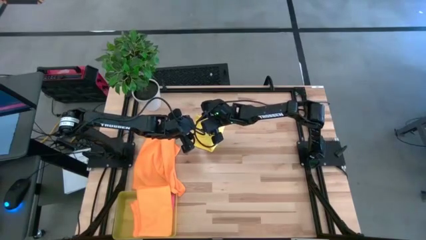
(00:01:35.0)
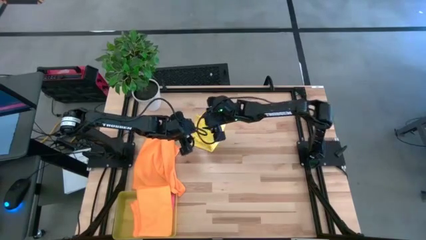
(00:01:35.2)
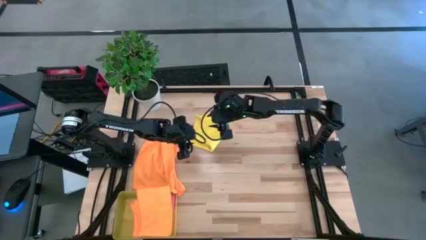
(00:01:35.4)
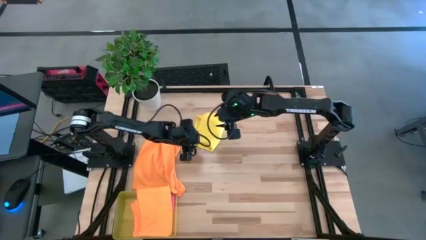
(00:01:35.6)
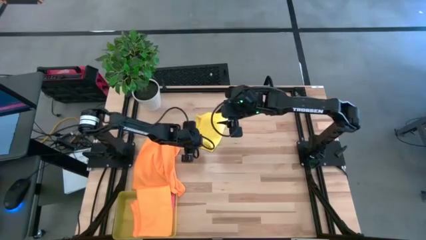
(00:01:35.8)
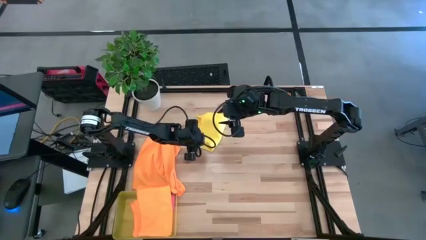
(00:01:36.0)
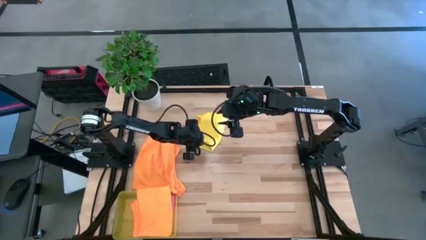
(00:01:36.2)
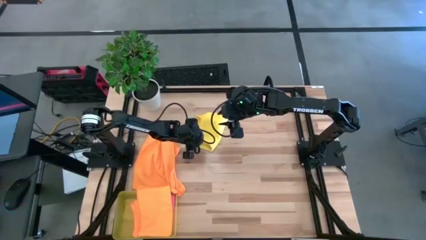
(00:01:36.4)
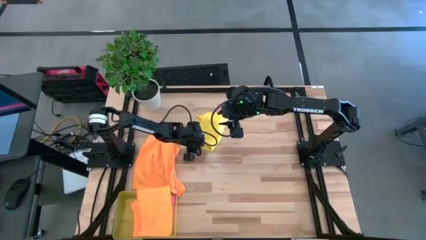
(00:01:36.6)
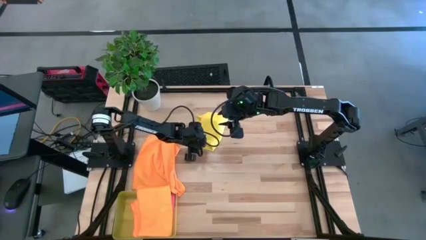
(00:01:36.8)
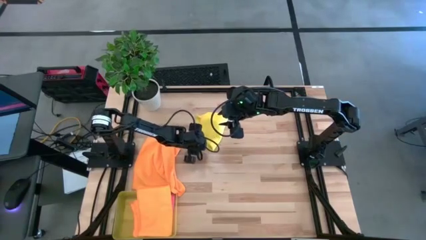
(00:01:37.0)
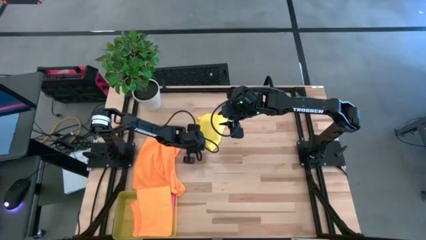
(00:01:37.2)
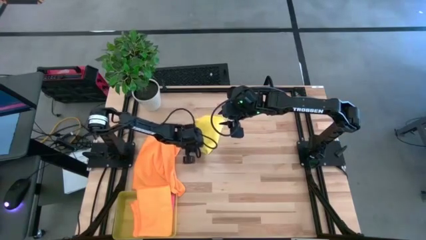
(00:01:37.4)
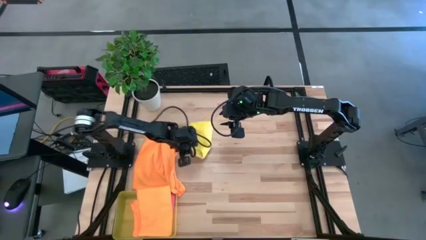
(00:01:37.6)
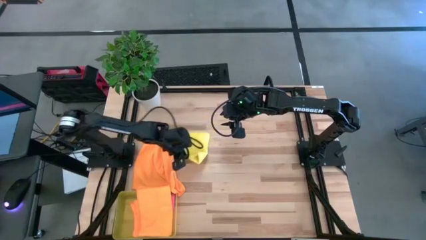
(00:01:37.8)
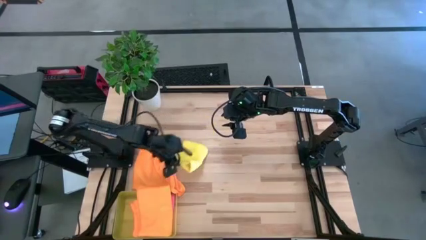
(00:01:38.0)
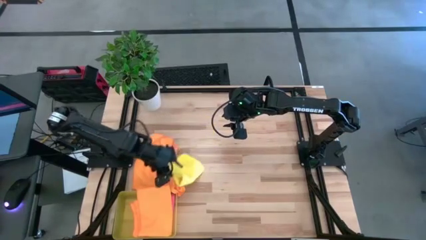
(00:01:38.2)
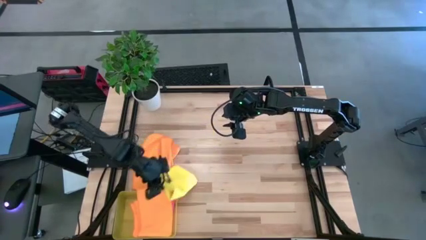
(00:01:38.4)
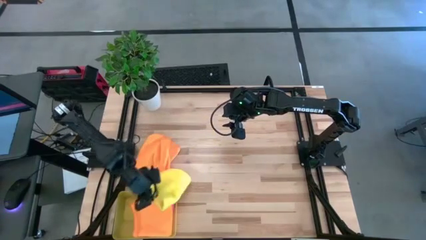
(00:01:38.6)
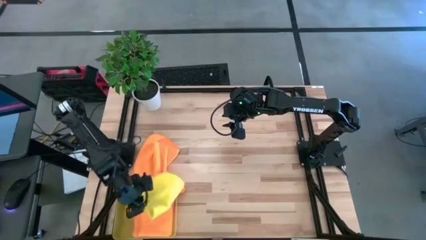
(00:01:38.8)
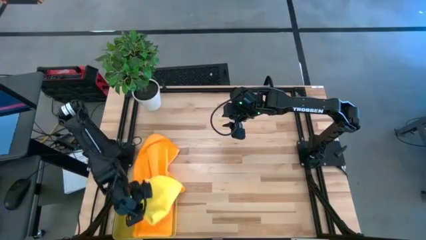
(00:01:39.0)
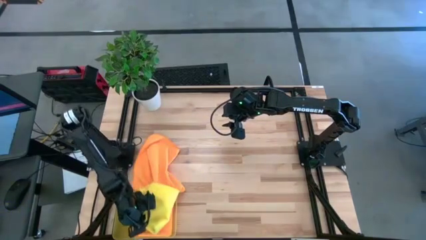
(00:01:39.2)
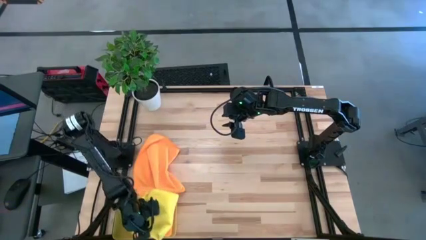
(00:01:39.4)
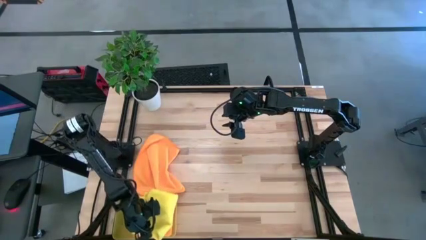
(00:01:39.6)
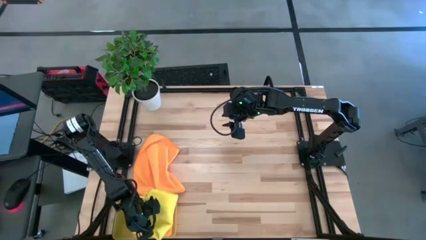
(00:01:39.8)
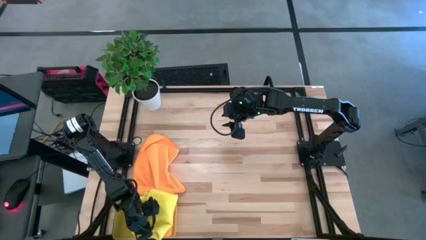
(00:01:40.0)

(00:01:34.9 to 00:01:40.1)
Task: Fold microfiber towels
Put the folded yellow microfiber towel into the yellow bin

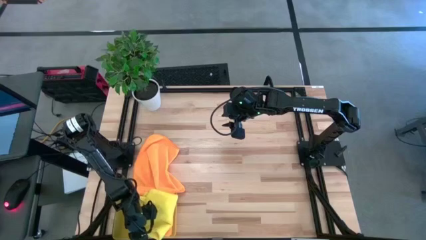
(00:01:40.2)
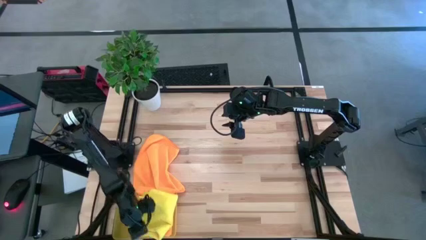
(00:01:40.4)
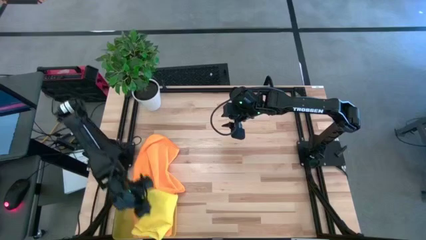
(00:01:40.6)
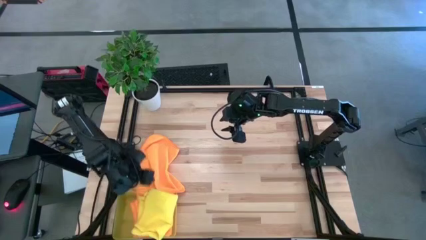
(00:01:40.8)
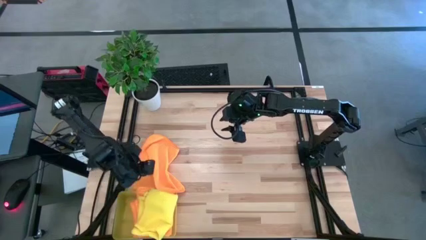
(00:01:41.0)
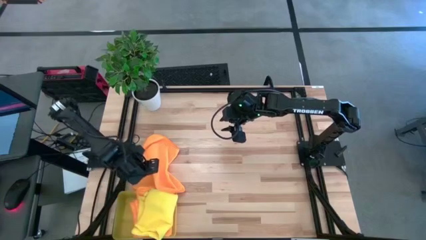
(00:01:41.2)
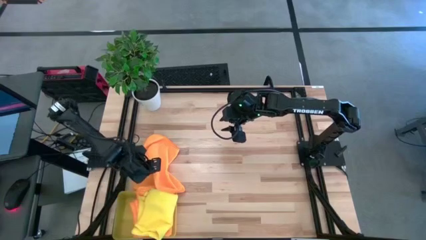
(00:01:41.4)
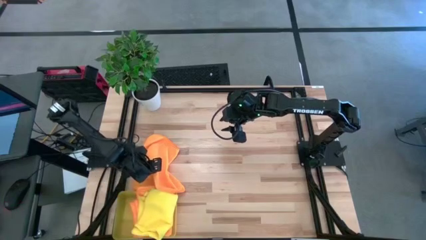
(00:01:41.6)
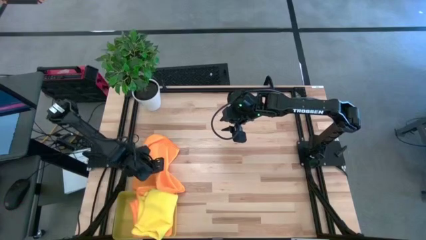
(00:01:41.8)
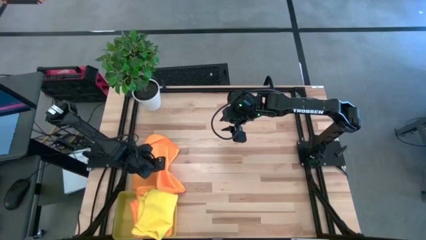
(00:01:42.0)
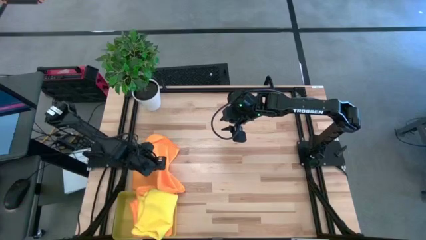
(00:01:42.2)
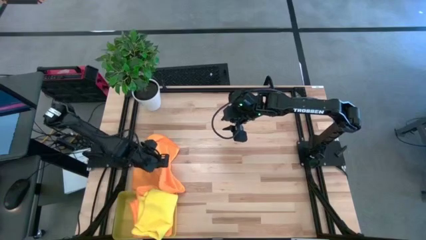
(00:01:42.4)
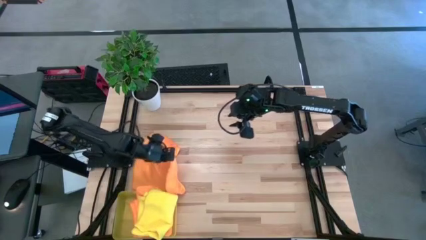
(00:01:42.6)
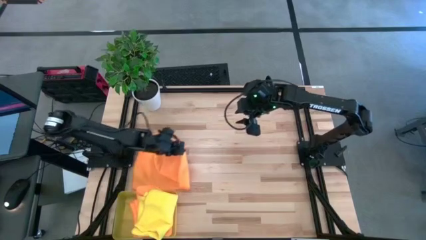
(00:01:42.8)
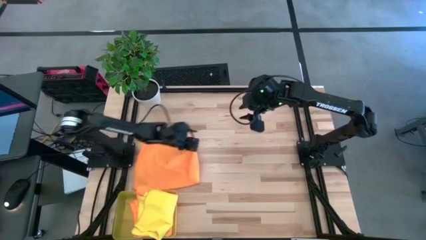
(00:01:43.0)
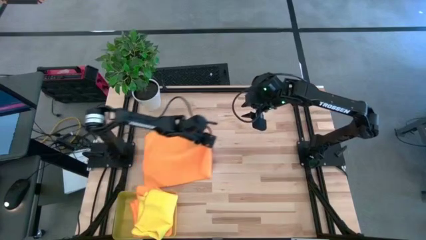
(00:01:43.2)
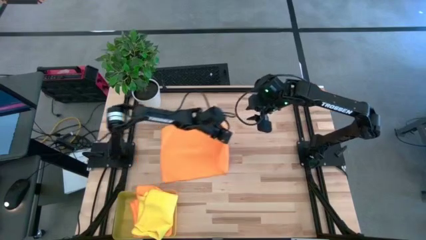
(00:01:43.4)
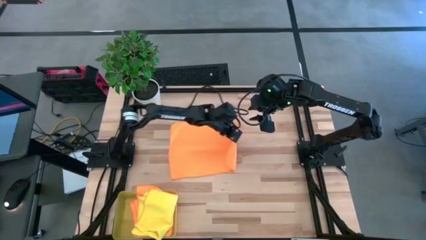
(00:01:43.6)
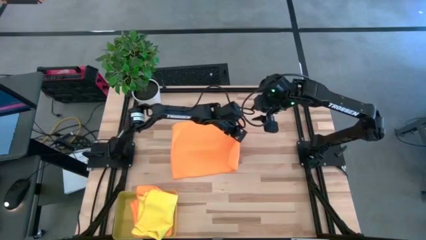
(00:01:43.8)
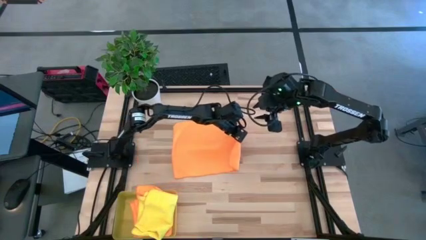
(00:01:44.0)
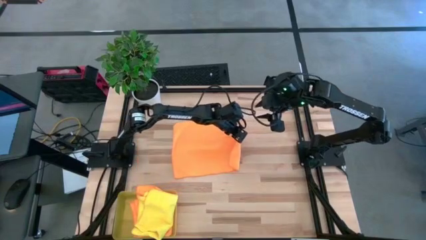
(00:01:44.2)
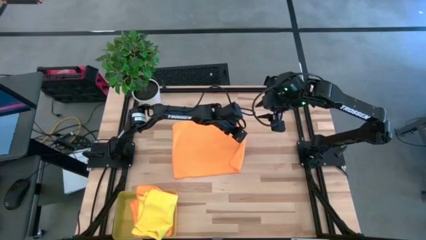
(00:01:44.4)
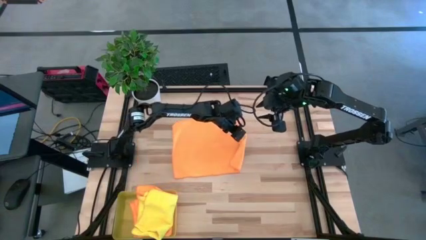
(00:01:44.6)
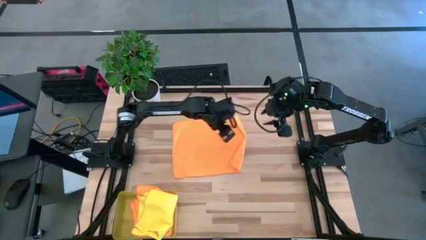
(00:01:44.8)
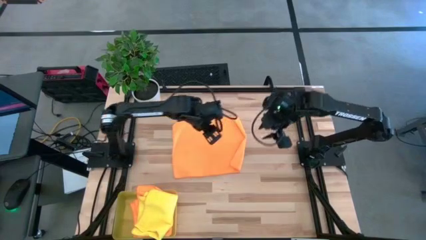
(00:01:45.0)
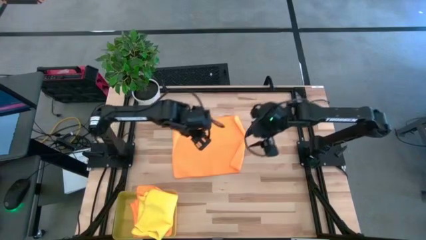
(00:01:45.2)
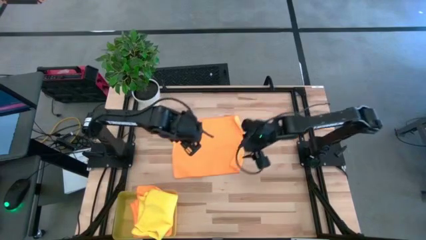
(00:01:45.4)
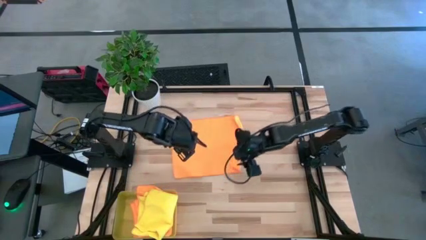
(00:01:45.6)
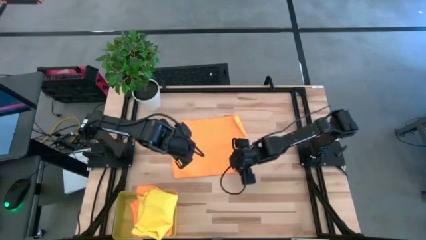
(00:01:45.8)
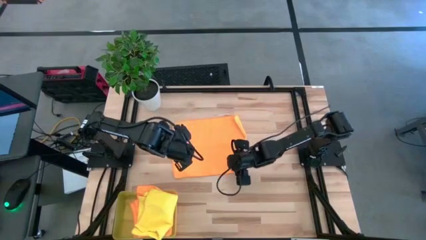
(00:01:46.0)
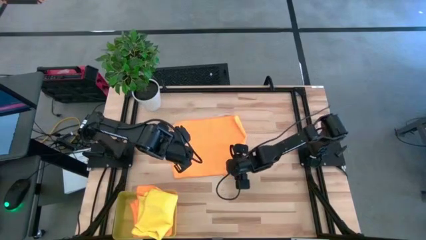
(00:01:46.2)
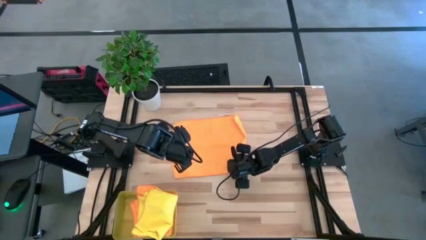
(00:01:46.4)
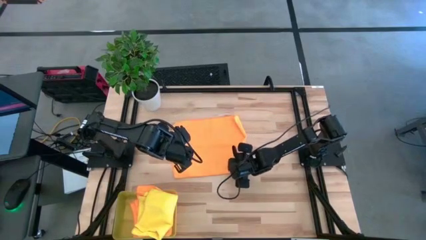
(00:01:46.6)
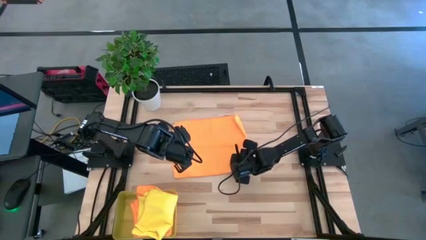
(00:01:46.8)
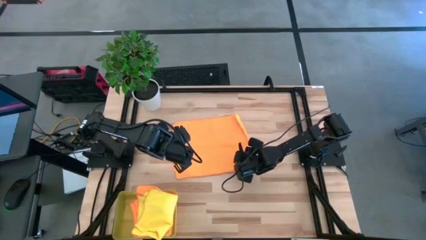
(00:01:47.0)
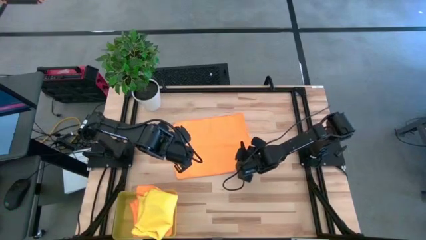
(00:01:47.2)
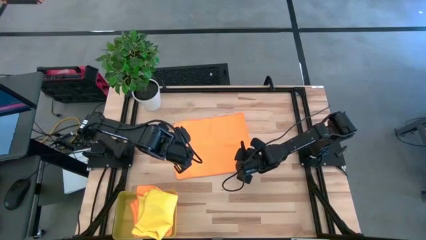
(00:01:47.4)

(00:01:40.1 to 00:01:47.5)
Fold the orange microfiber towel

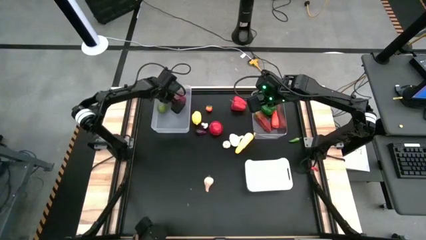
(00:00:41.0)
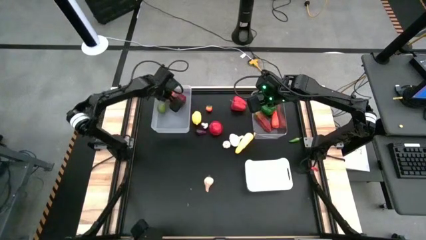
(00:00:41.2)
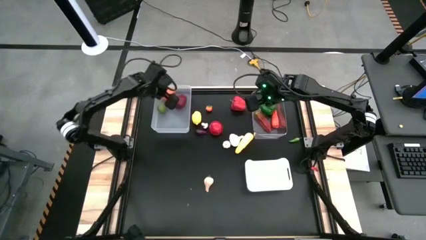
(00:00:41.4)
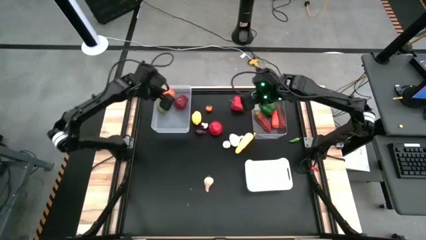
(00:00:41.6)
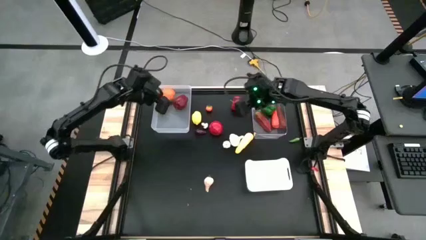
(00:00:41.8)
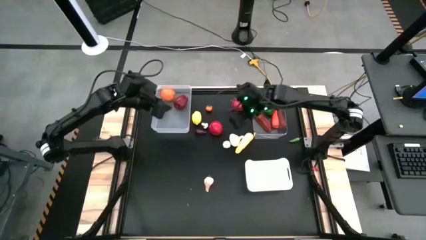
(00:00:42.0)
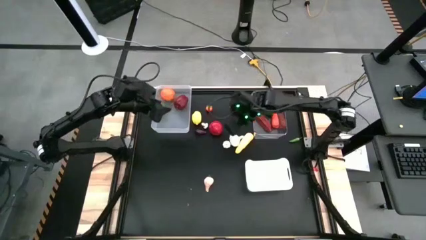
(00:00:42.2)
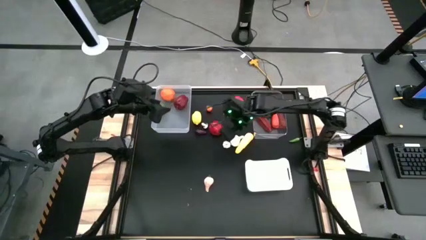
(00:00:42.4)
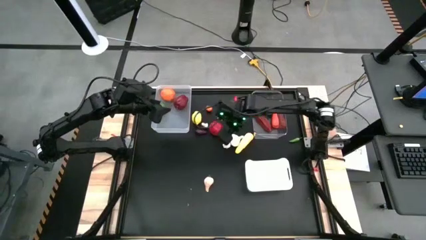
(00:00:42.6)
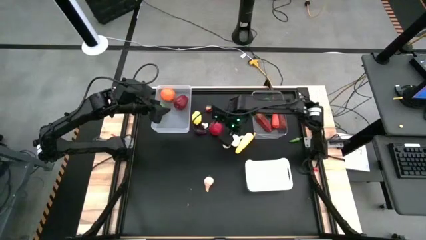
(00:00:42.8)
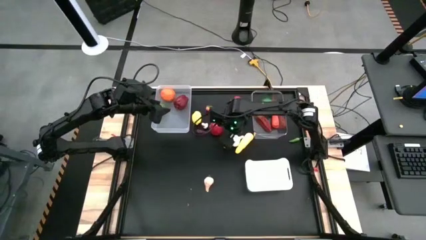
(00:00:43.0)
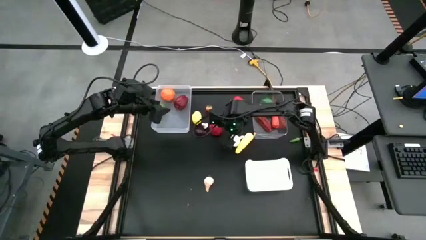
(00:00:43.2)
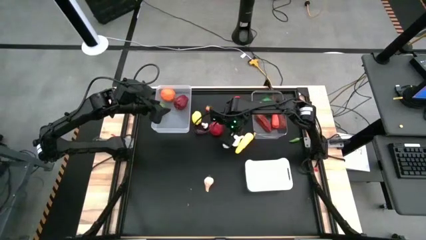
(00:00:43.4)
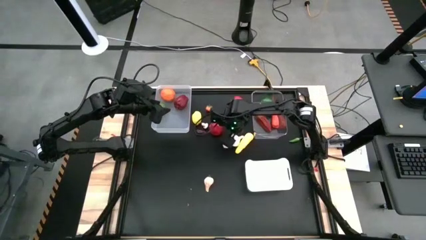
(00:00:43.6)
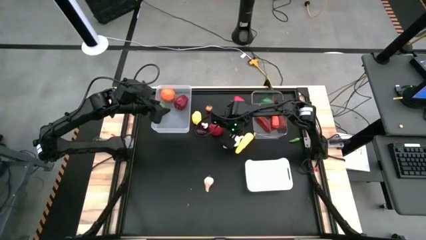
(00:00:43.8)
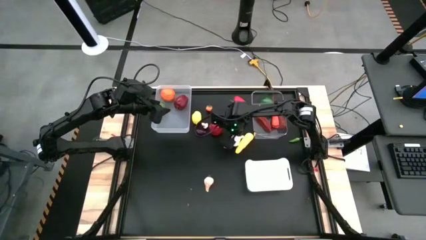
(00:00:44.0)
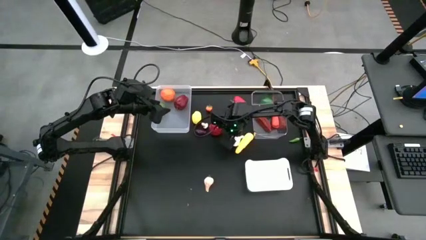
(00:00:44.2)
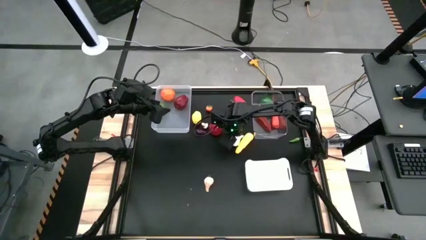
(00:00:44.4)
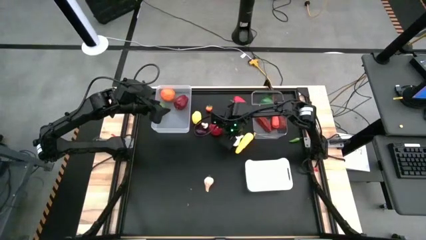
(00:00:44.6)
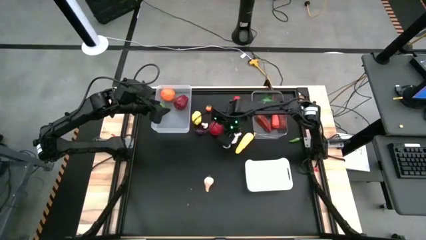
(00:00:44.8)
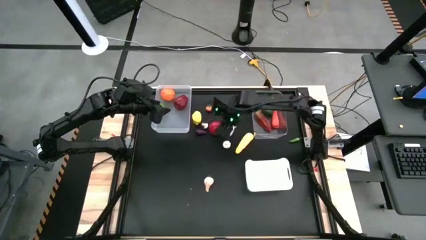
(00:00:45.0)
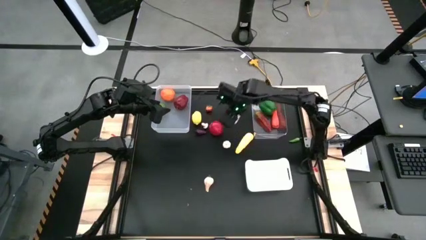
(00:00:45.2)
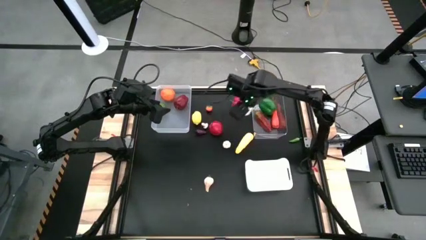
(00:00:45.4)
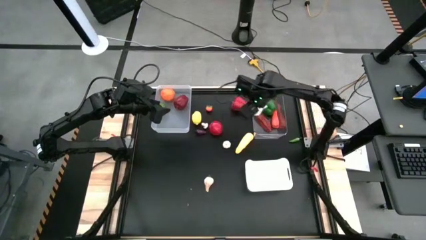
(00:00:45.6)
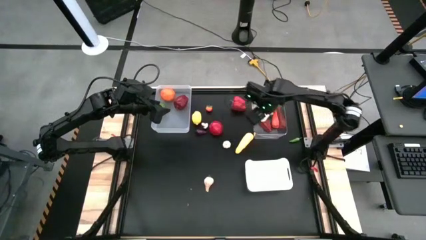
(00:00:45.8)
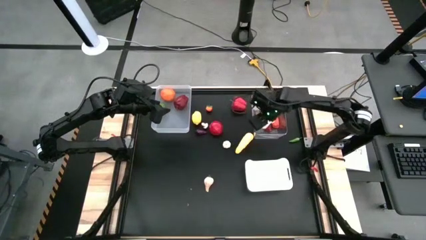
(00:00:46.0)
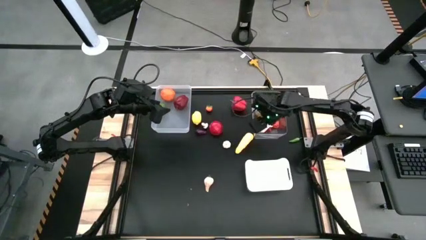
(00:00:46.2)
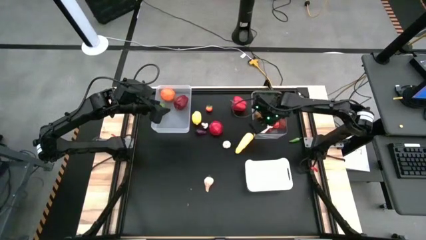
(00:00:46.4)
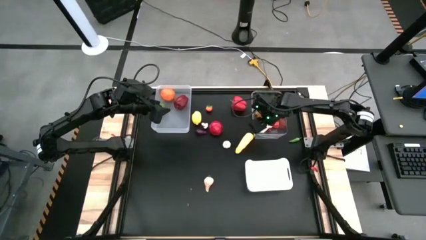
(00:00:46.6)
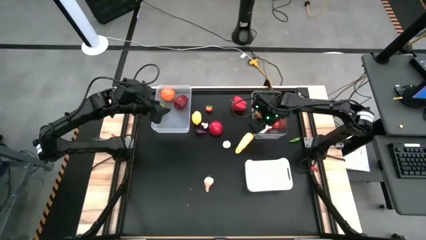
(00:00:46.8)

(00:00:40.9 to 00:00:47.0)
Task: Sort produce into baskets
Put the big white garlic into the transparent bin
